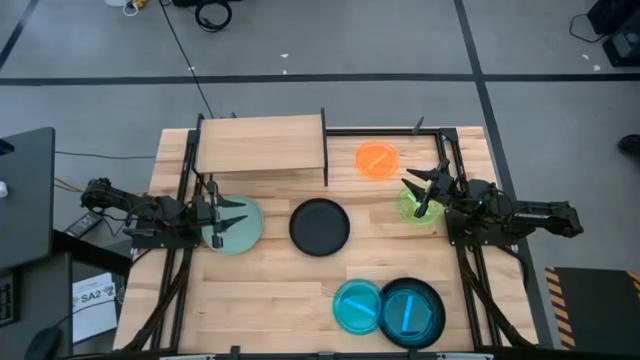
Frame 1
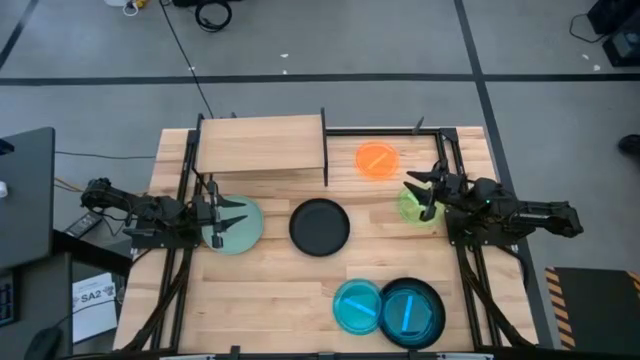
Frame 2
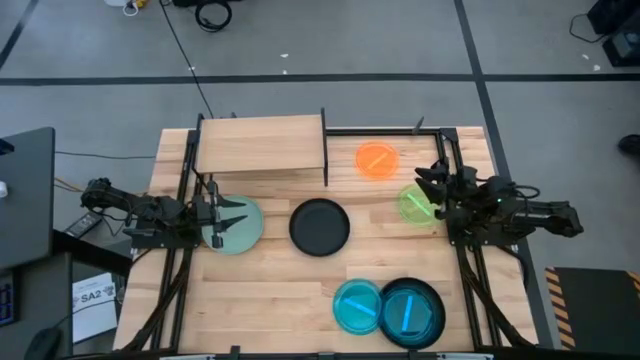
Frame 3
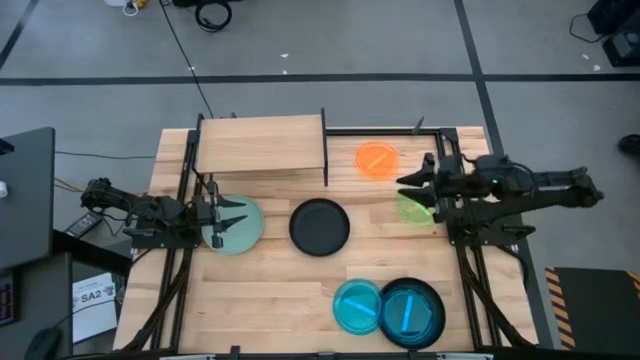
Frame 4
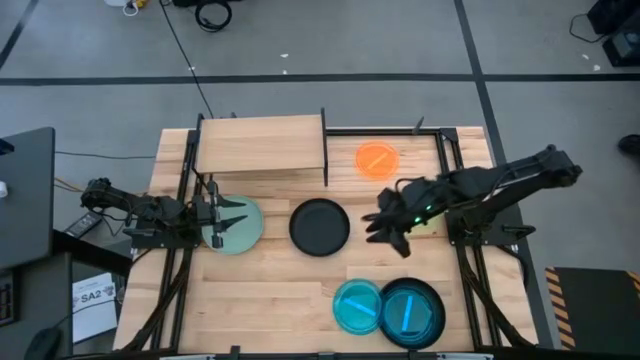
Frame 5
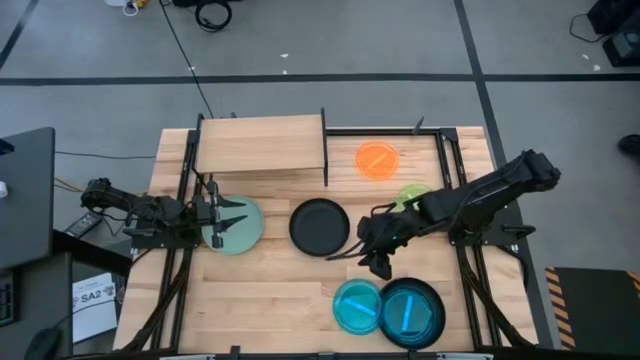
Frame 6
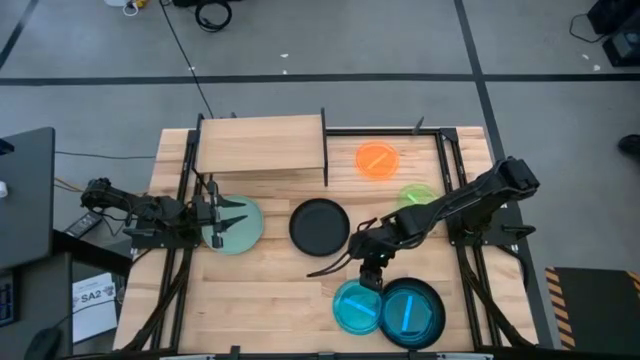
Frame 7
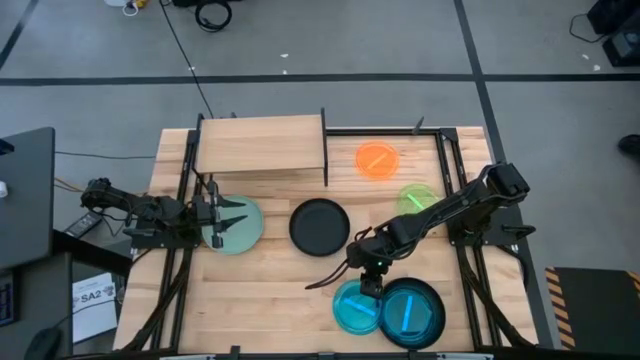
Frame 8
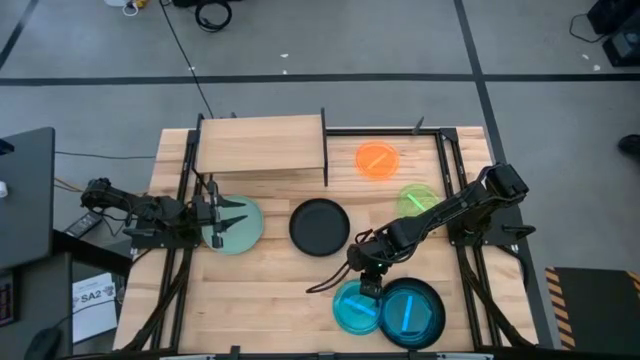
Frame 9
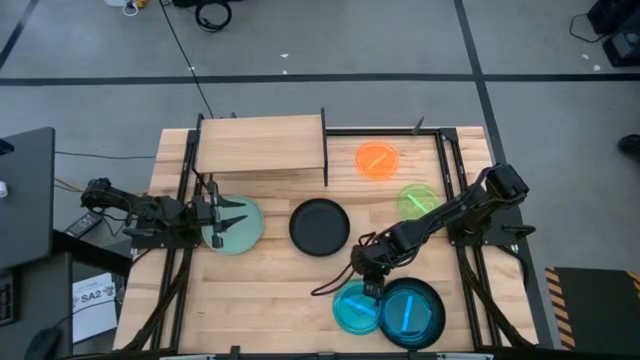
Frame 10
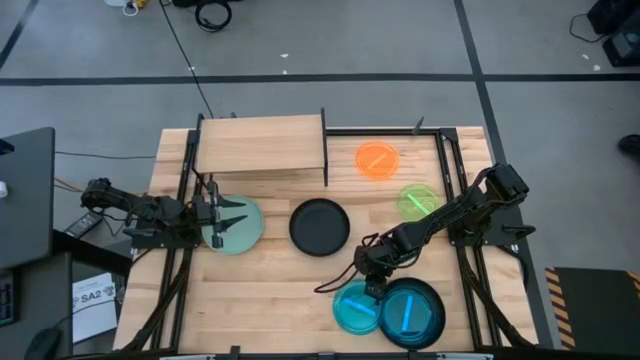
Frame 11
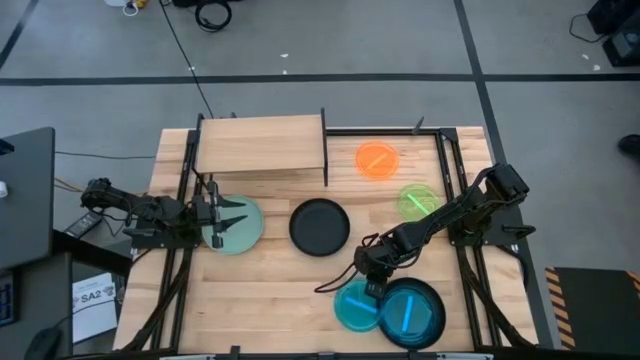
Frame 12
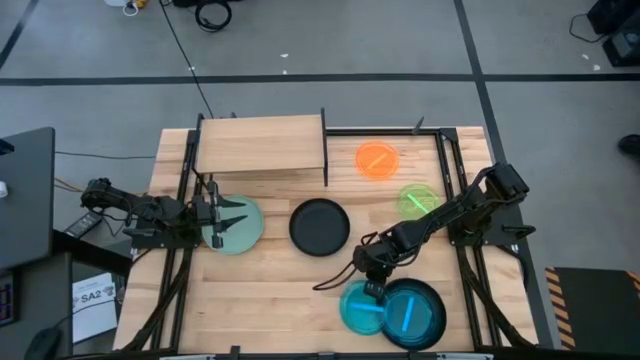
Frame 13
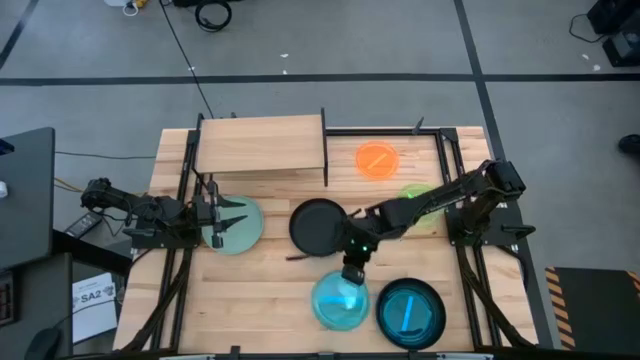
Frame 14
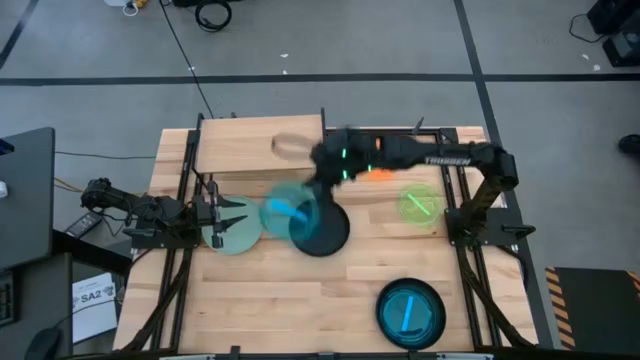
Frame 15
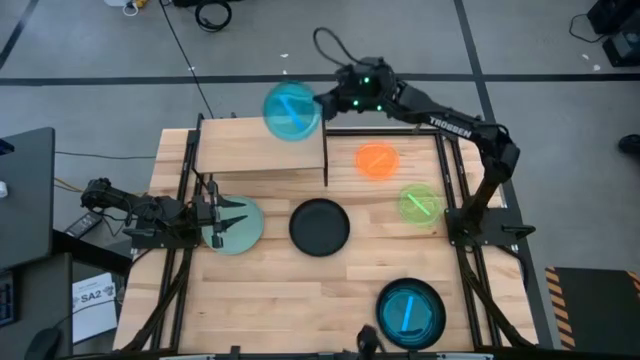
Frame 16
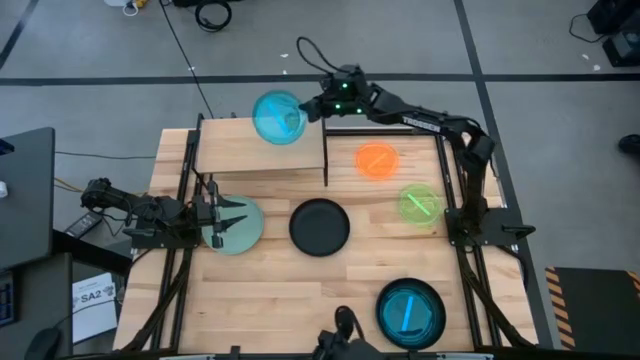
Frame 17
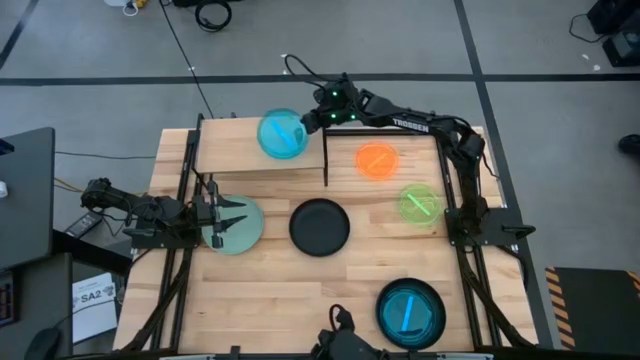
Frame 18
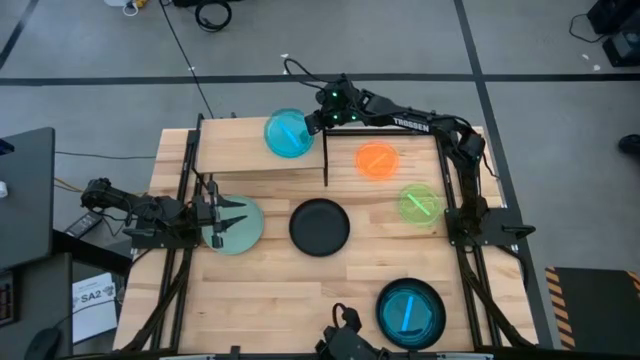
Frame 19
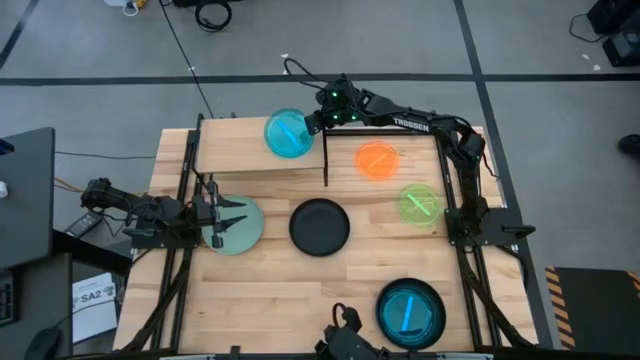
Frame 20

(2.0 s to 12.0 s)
Task: Place and stack plates onto a shelf
Put the left blue plate on the shelf

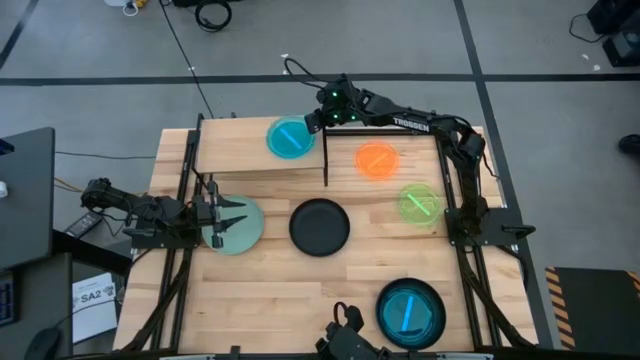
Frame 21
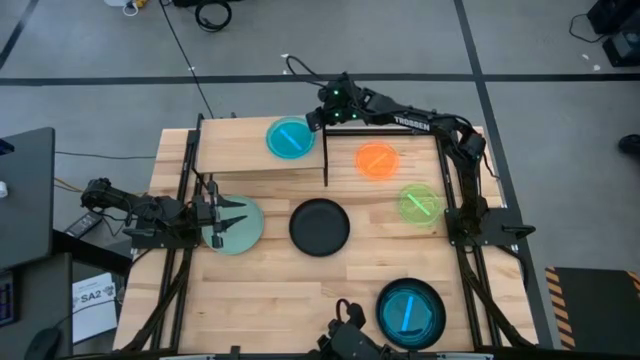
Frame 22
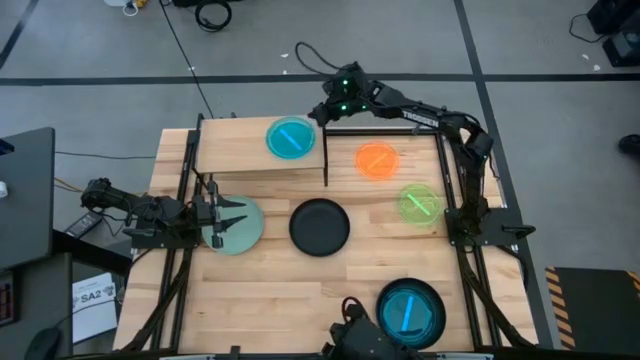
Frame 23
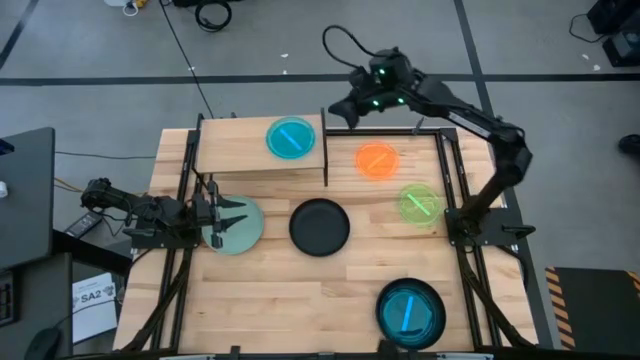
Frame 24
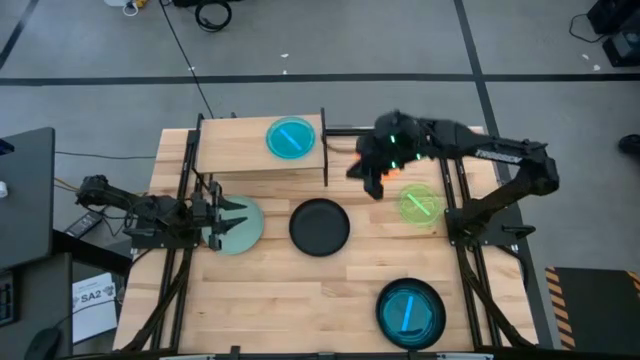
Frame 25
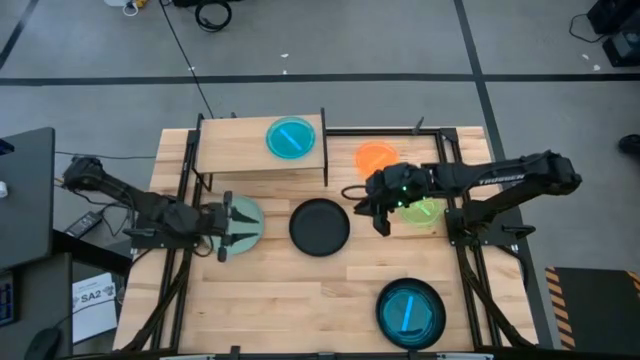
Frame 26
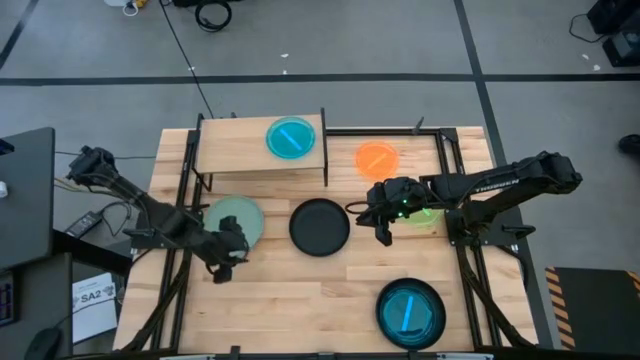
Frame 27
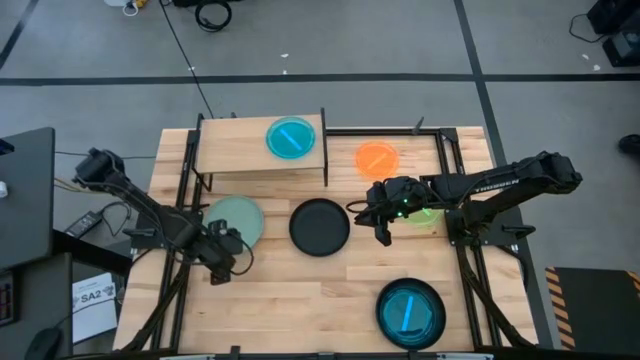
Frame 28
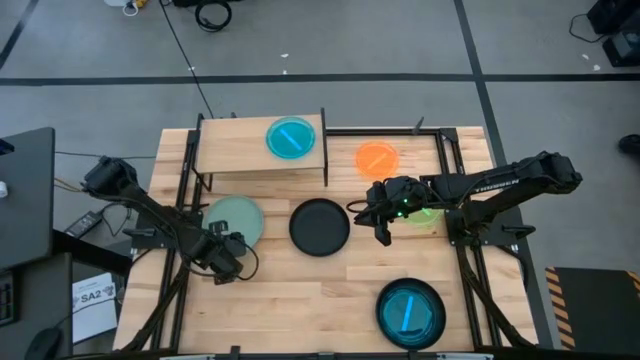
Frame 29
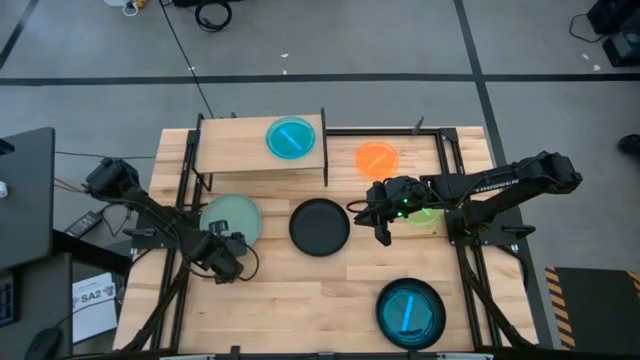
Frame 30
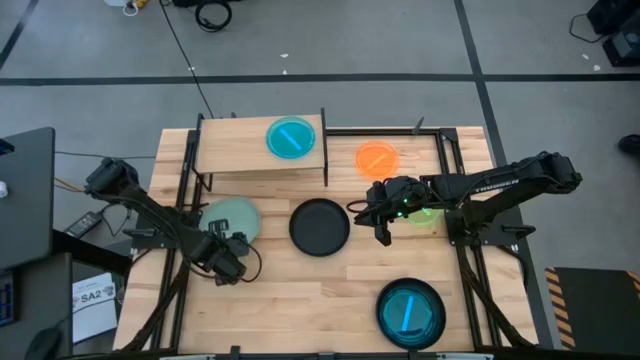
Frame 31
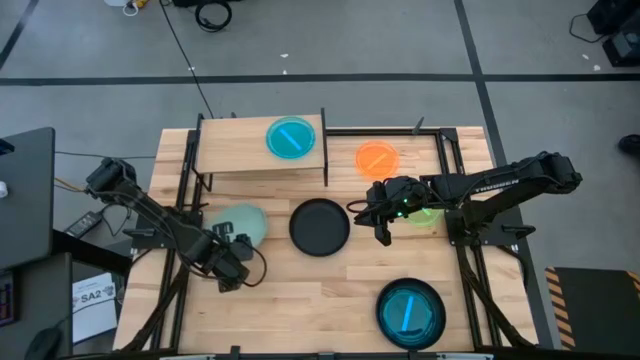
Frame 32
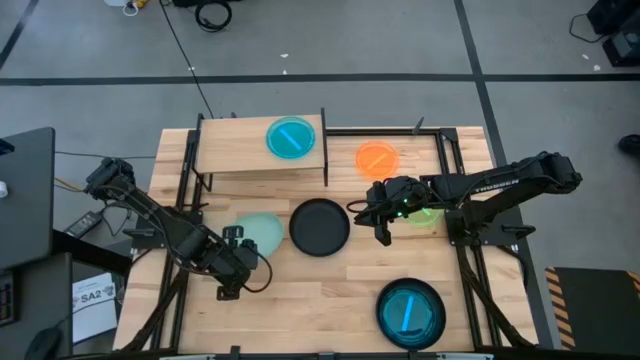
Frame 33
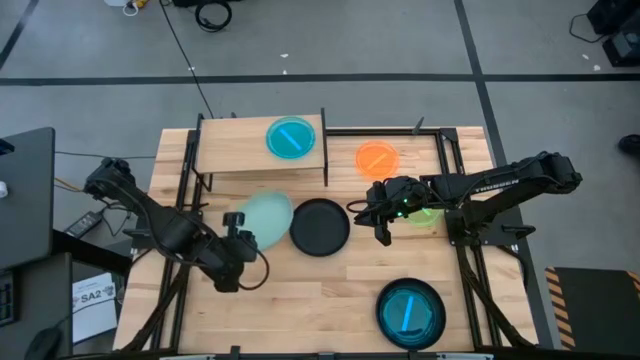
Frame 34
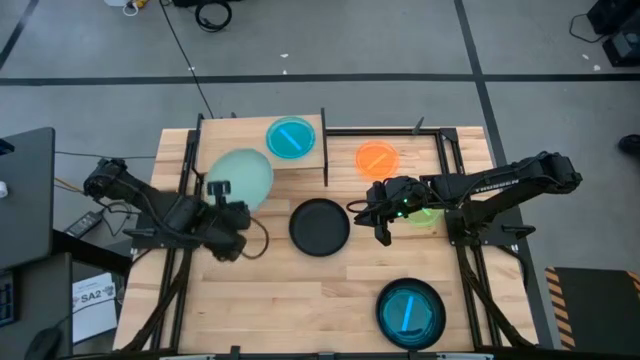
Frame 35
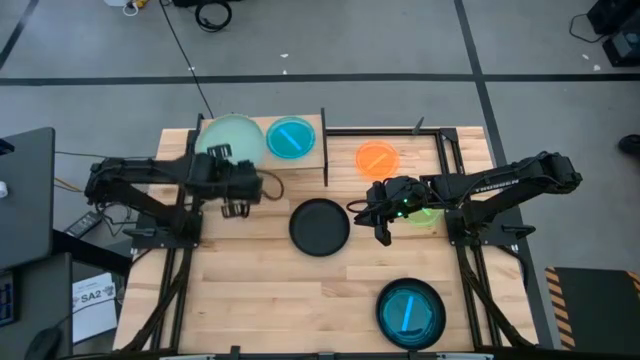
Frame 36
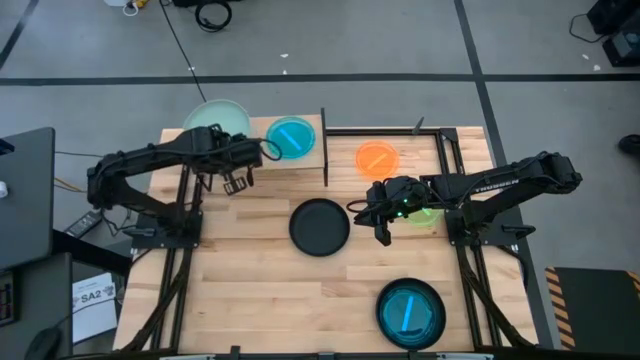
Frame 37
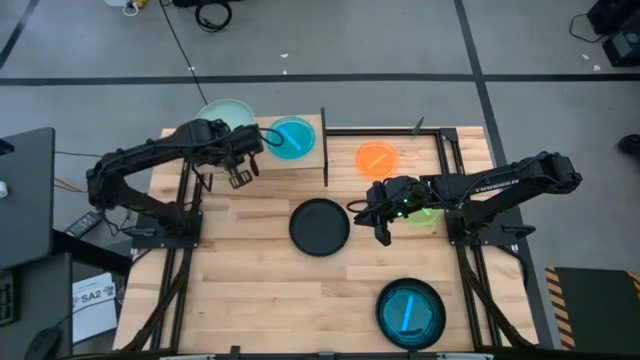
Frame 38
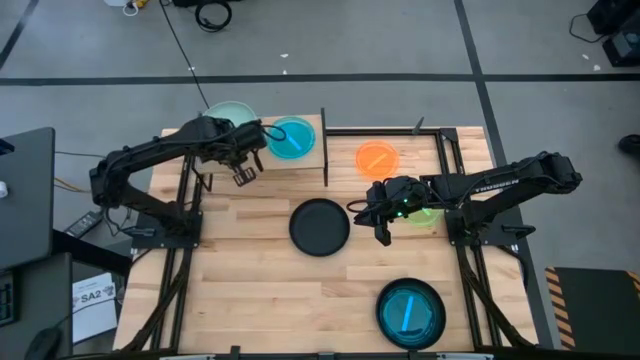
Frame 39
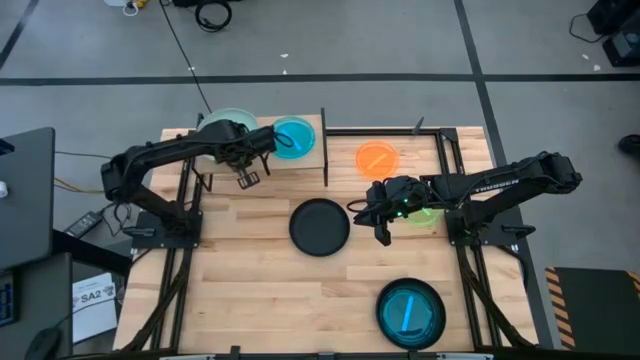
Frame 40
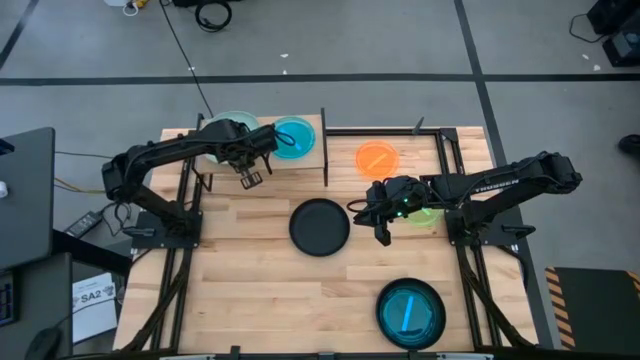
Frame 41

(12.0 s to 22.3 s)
Put the light blue plate on the shelf
